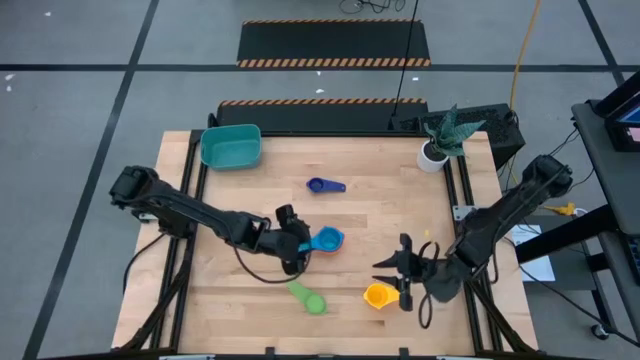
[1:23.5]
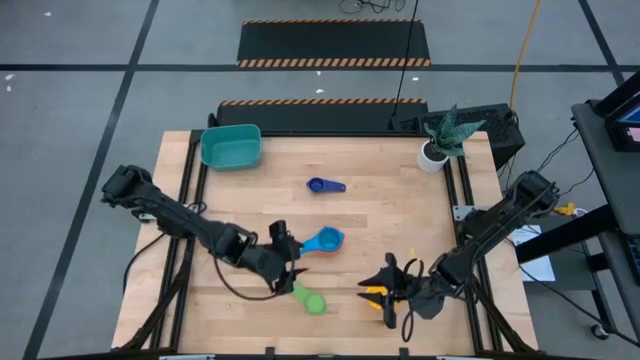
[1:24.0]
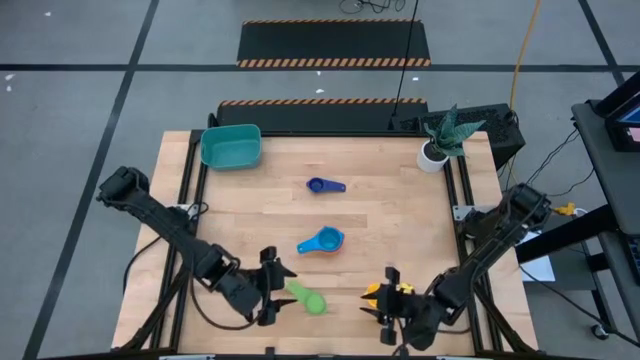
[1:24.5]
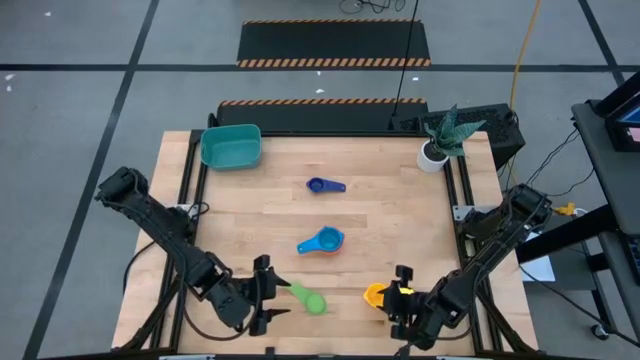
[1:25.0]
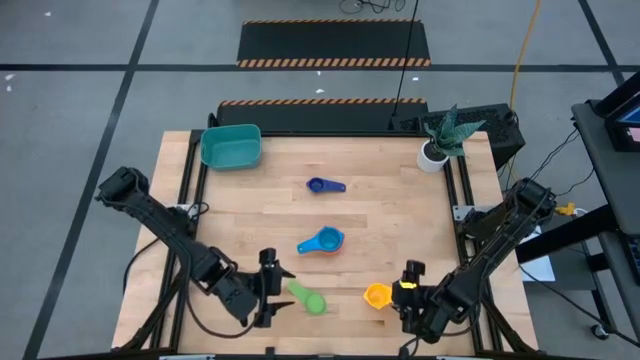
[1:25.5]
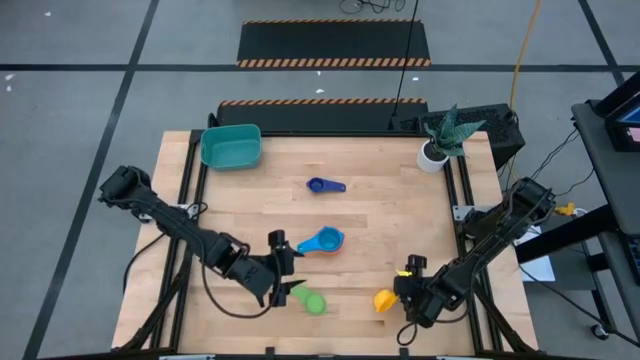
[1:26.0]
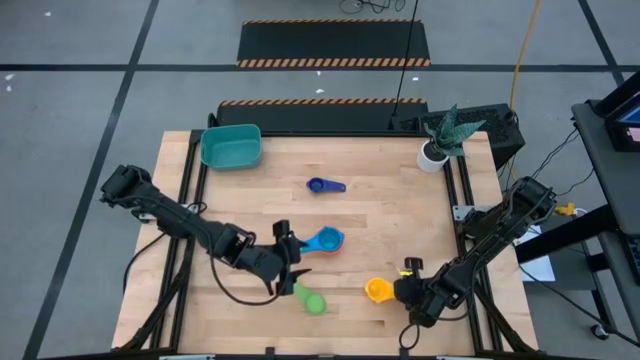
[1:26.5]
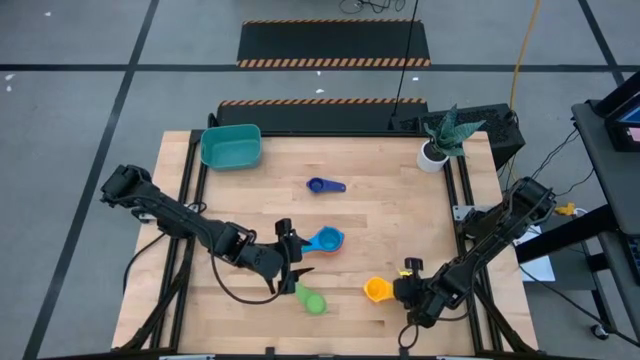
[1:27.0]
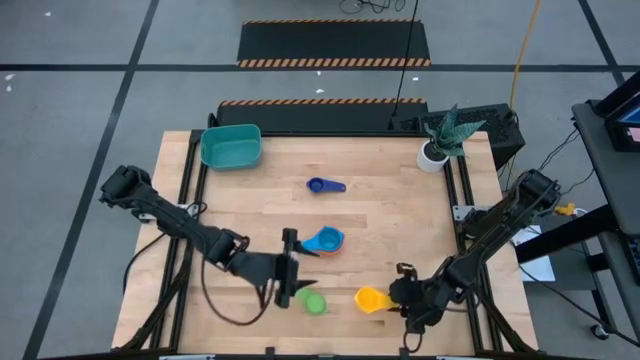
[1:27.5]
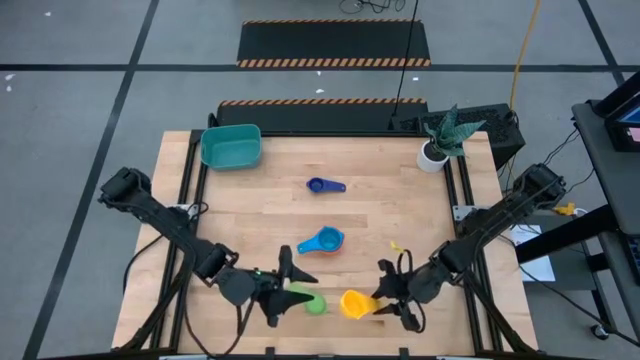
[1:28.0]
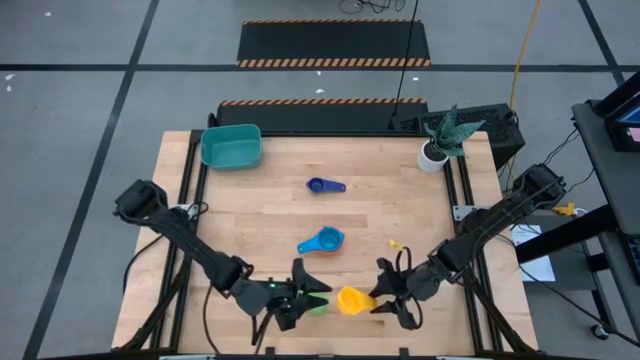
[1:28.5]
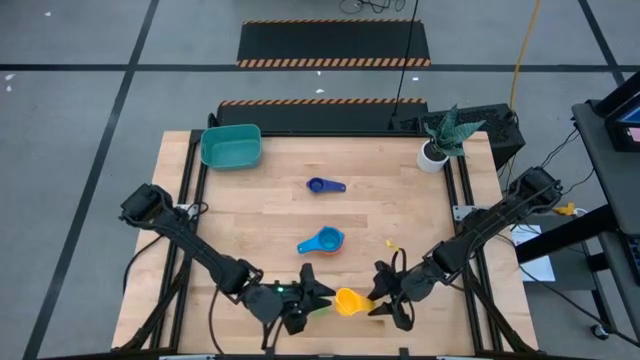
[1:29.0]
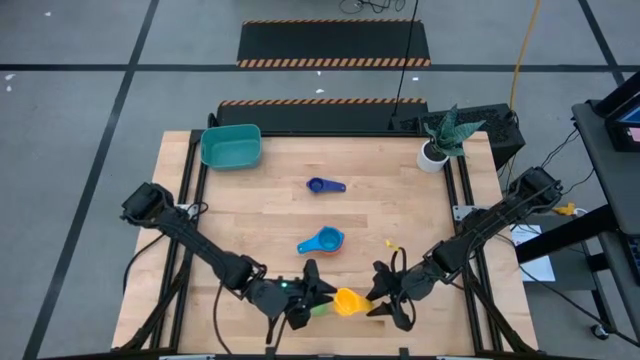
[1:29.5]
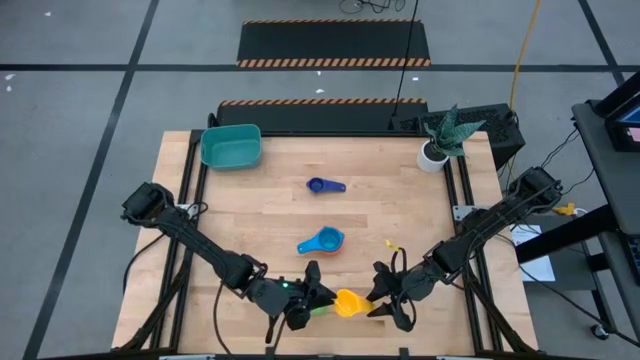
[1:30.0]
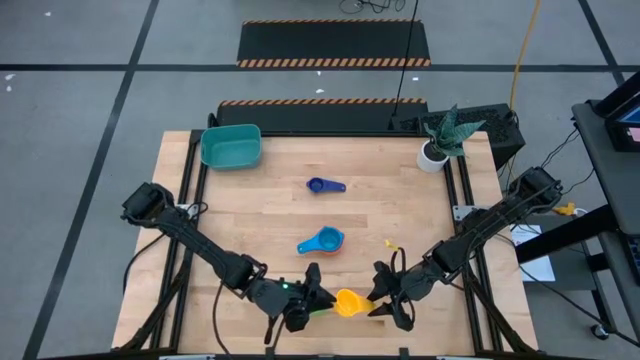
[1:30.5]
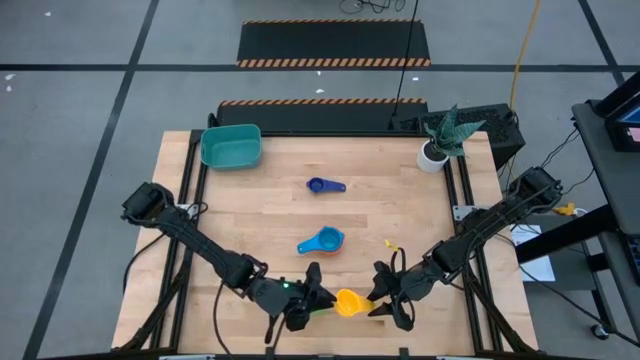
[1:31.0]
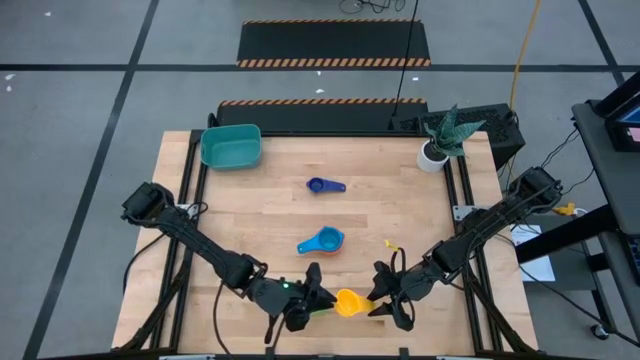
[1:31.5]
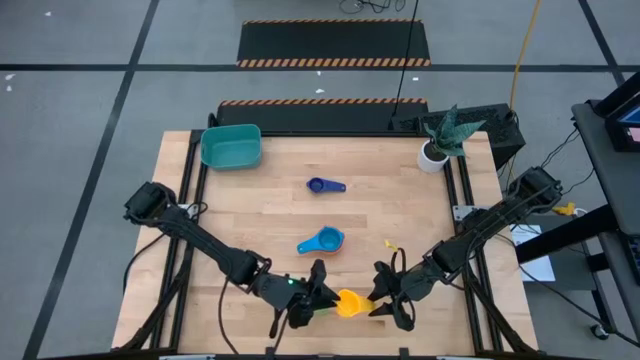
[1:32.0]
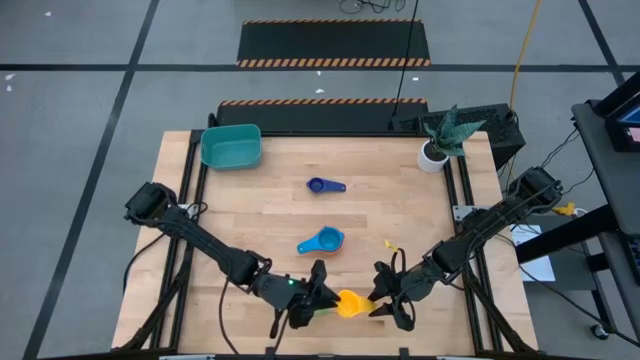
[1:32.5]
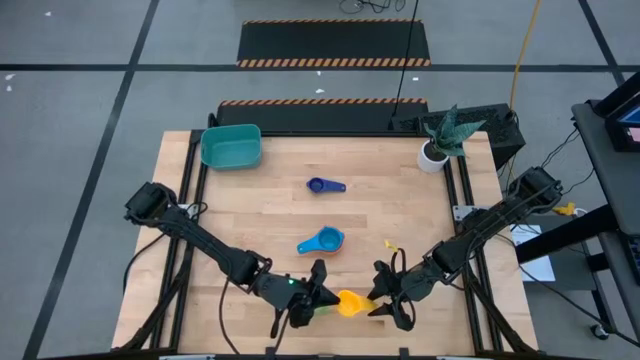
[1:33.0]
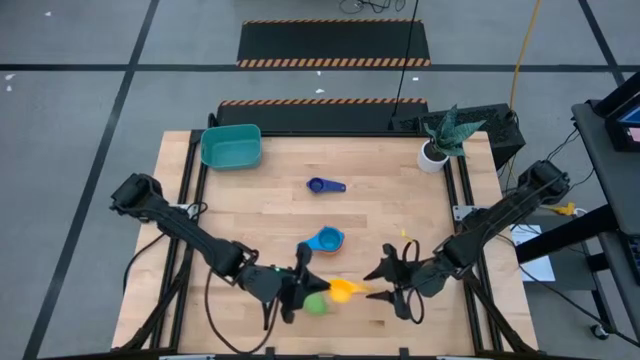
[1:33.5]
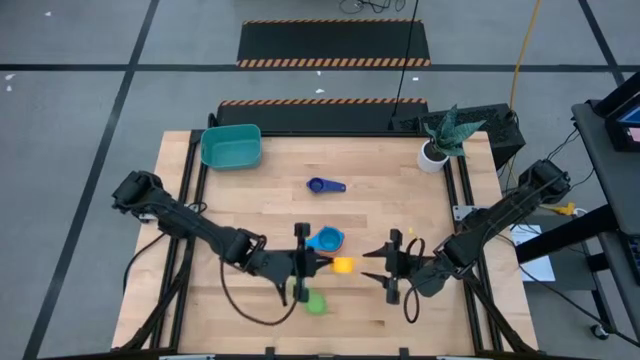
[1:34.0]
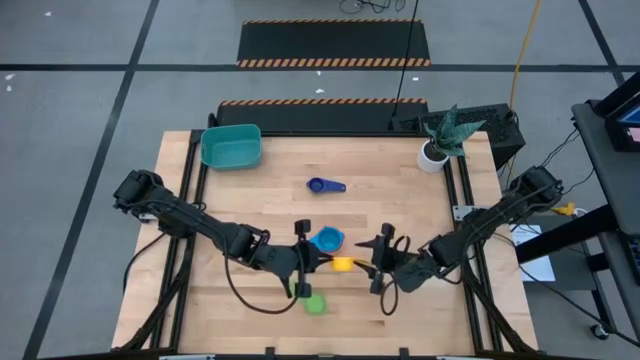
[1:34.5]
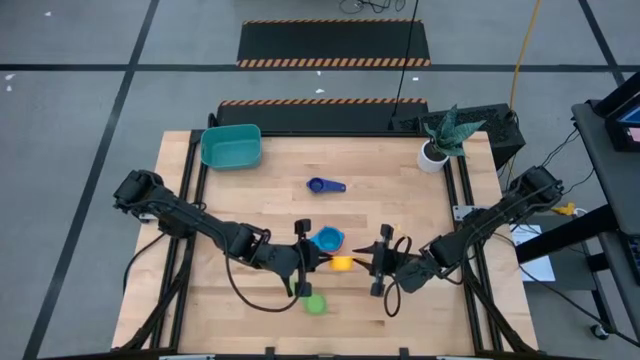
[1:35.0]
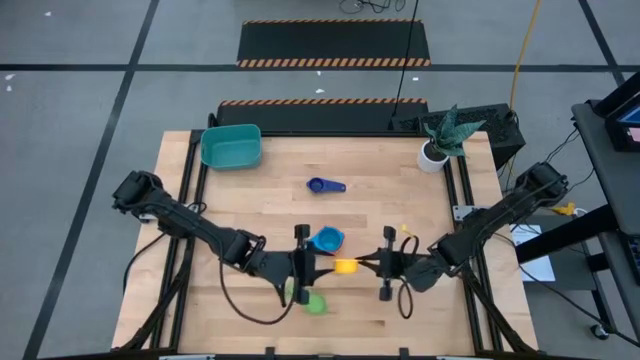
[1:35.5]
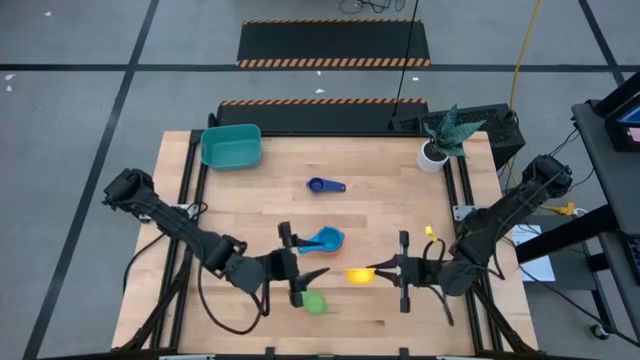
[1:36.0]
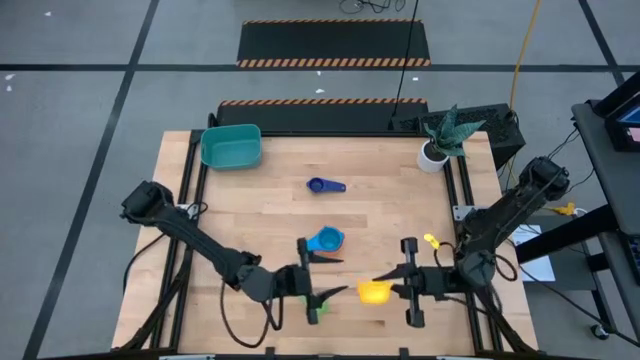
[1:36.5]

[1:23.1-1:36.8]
Task: Nest measuring cups in basket
Stack the yellow measuring cup on top of the light blue measuring cup

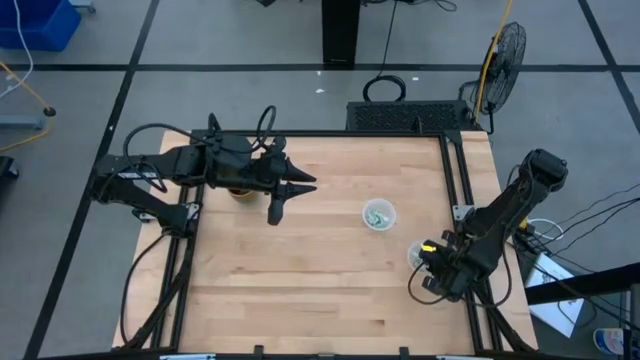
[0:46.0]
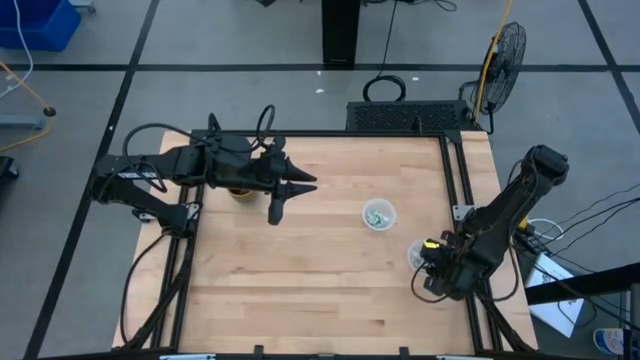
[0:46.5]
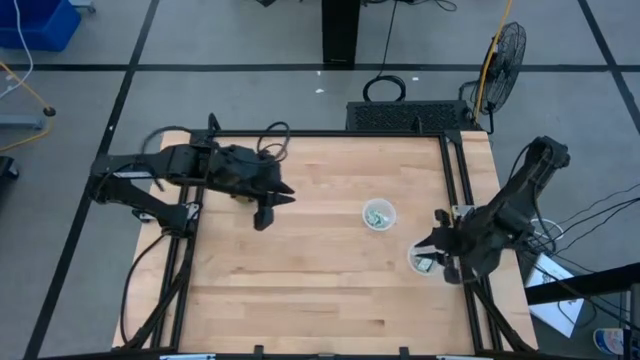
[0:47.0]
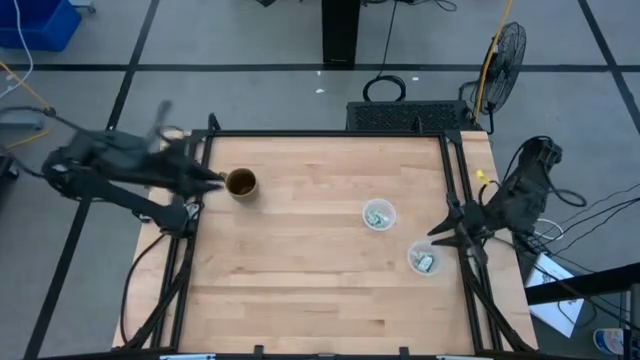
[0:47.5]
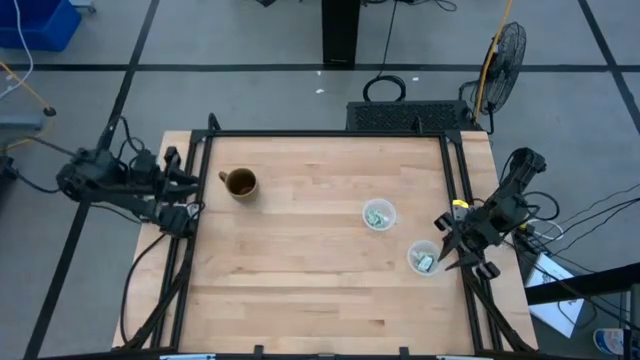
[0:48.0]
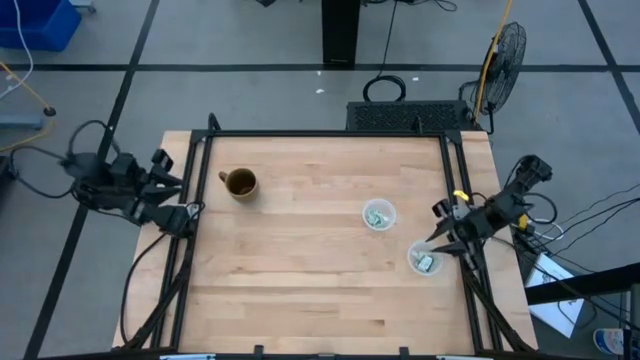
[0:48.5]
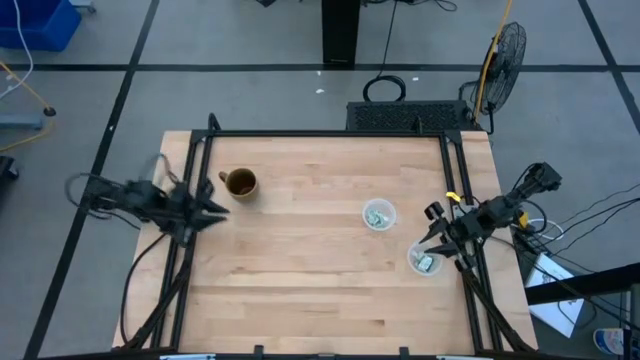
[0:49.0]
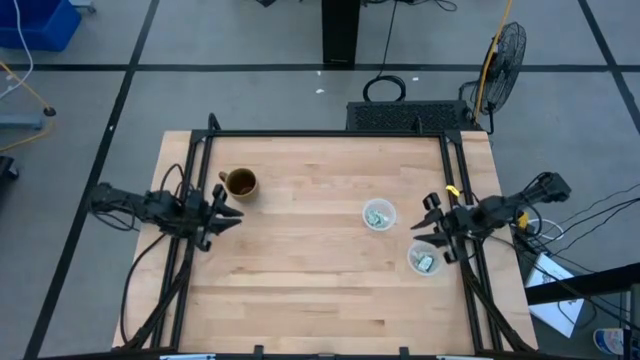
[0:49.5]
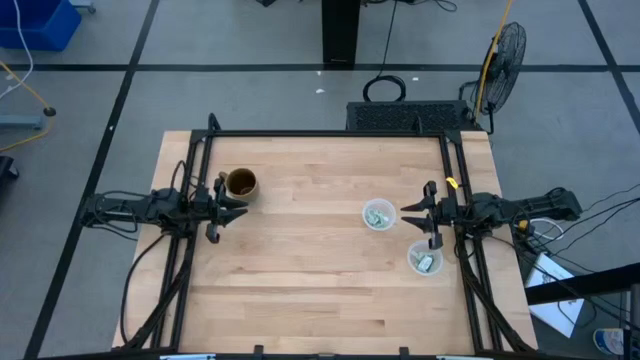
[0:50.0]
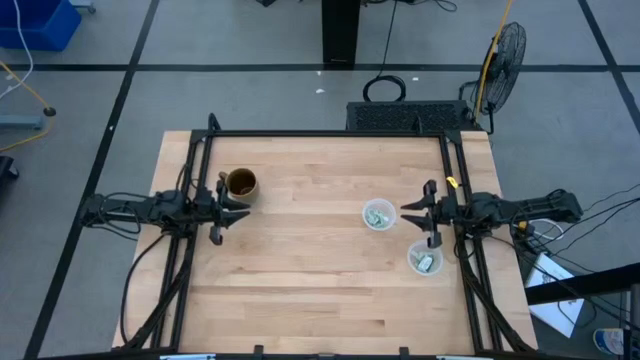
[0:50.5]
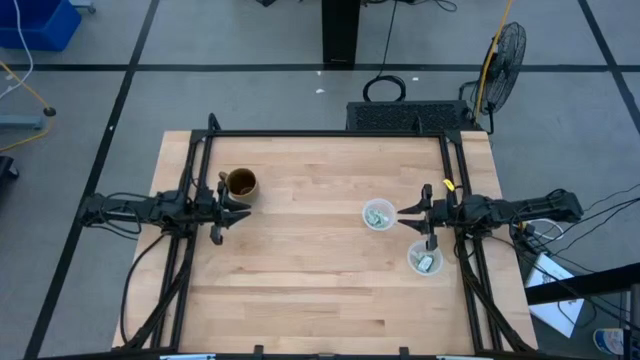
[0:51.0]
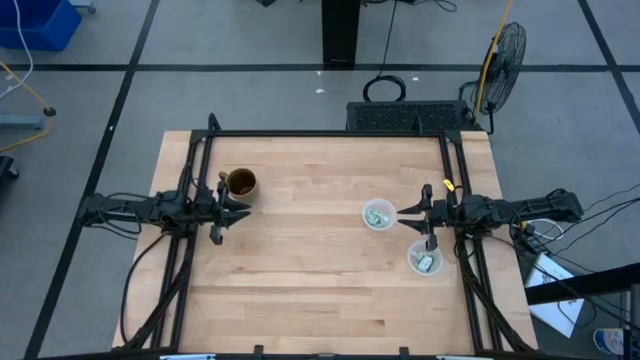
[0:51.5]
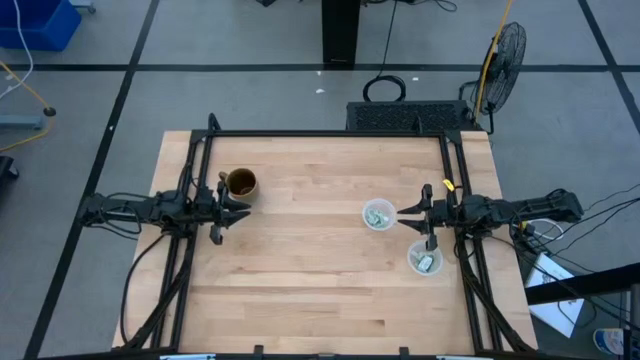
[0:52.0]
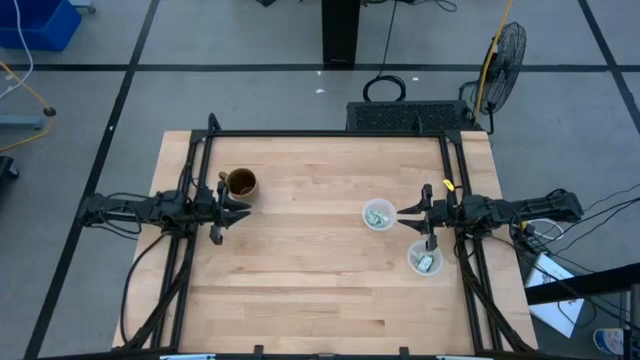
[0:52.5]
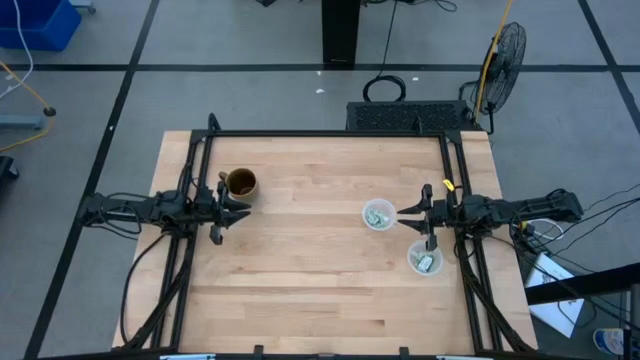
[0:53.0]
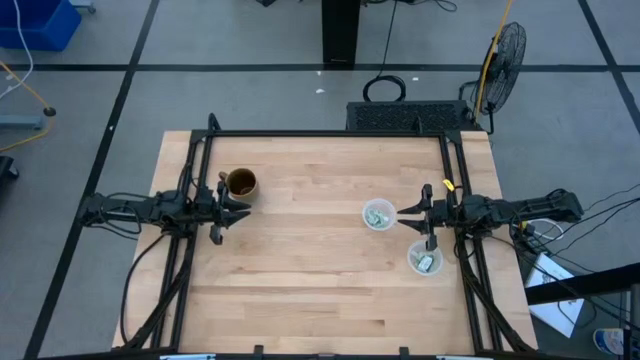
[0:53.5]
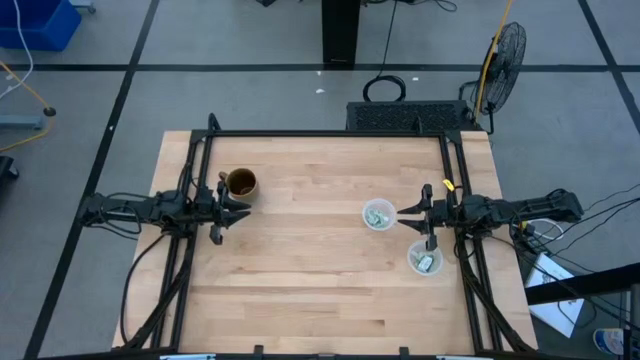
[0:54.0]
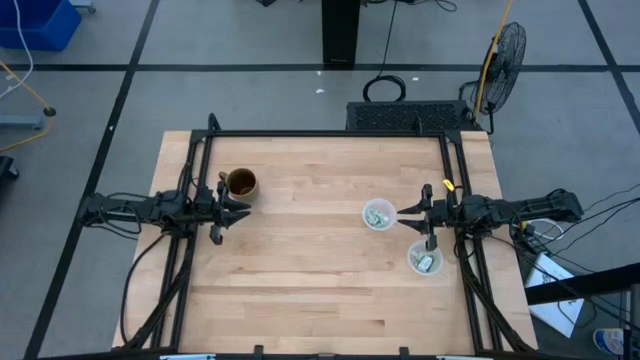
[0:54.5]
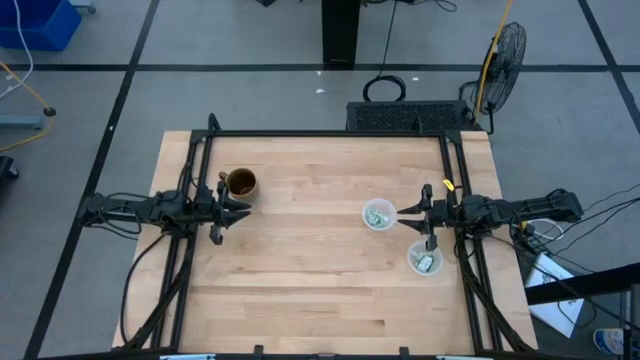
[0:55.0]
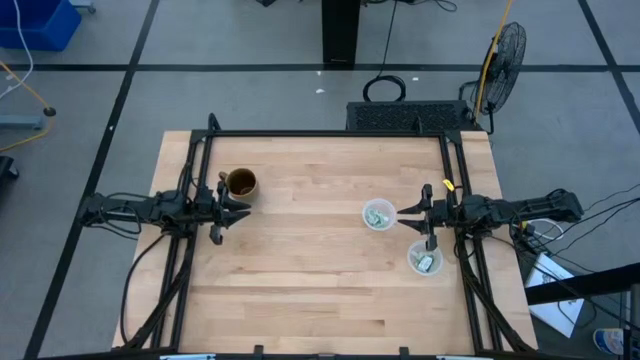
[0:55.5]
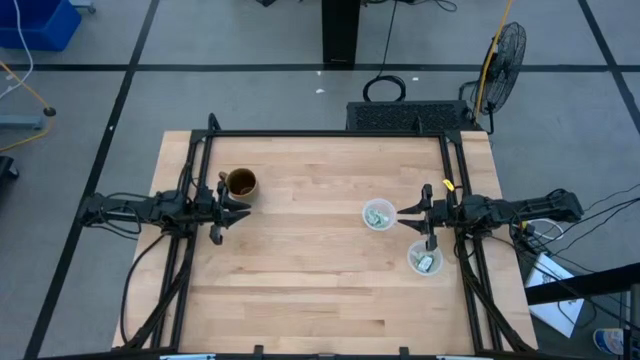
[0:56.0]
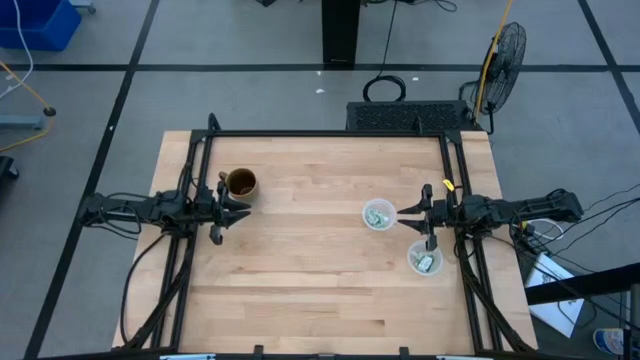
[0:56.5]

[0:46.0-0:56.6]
Task: Pick and place items into bin
Return to Home Position
